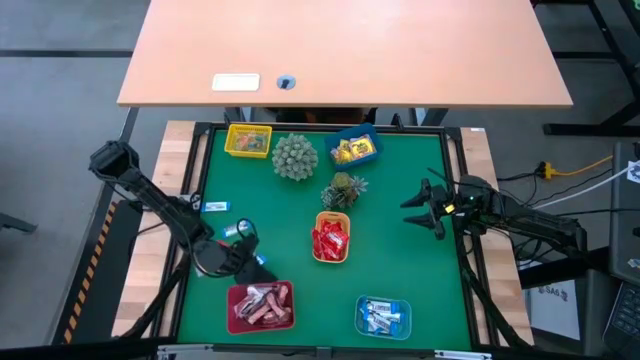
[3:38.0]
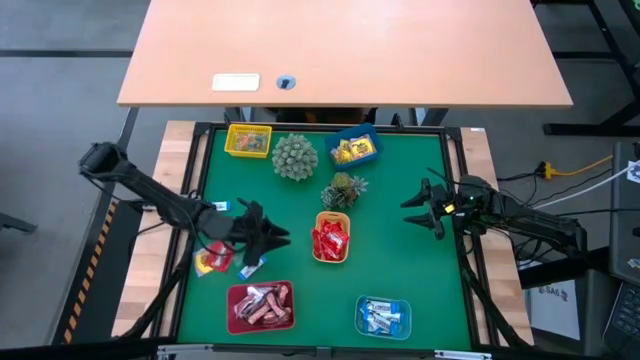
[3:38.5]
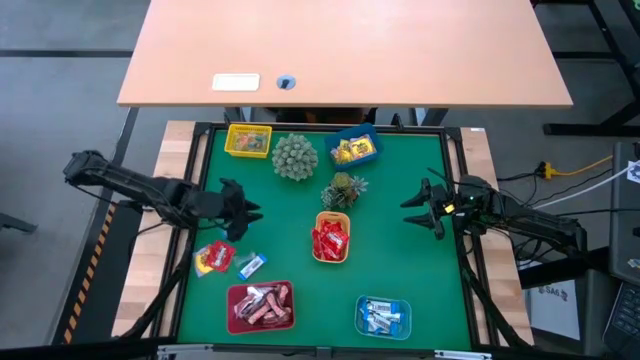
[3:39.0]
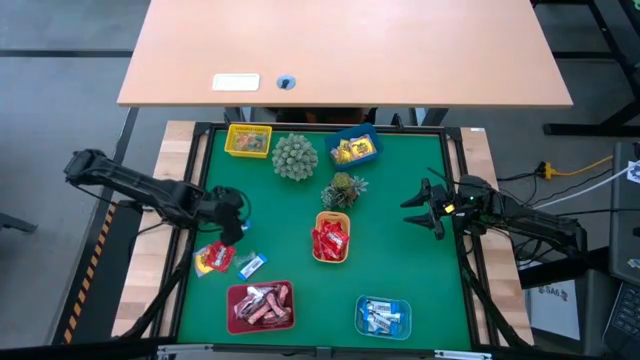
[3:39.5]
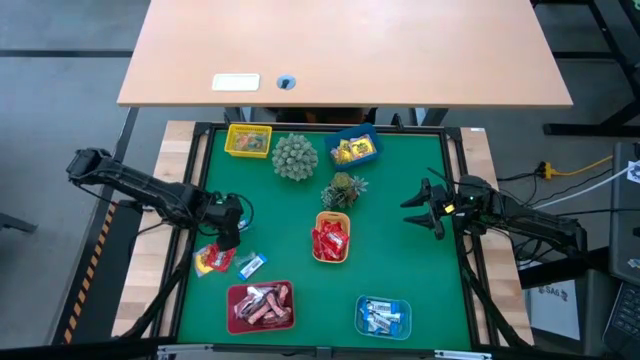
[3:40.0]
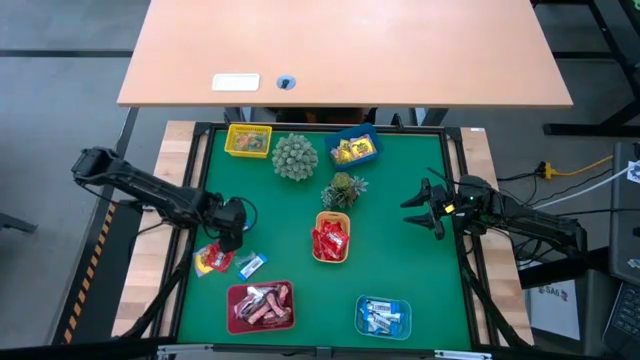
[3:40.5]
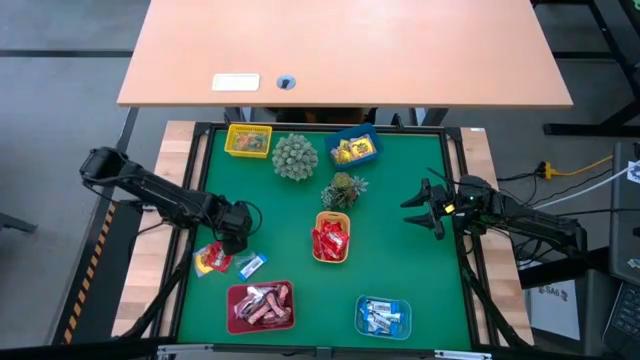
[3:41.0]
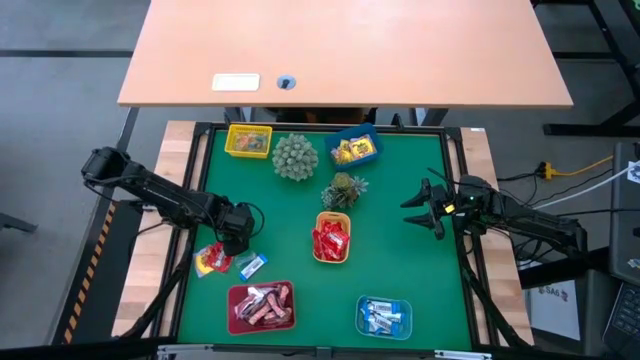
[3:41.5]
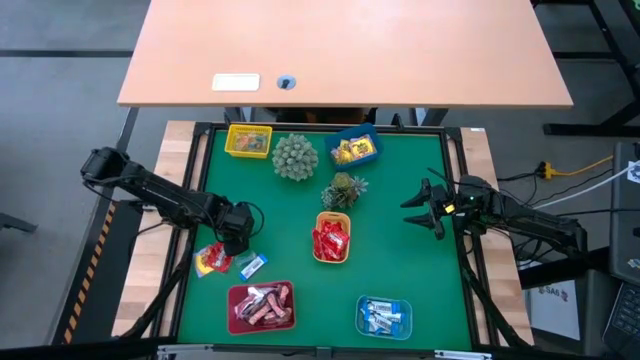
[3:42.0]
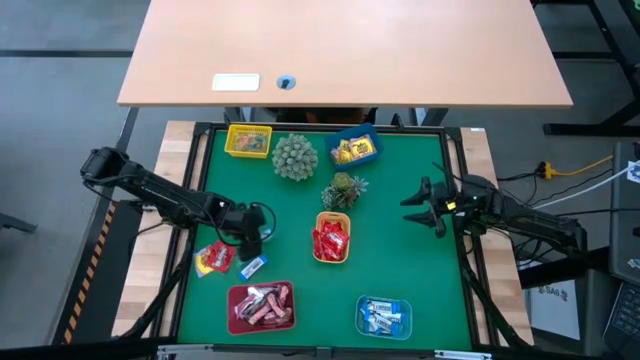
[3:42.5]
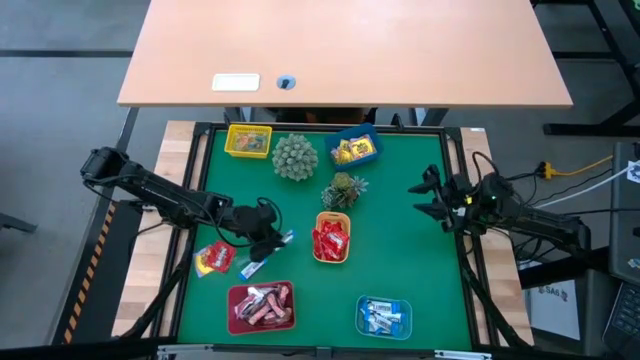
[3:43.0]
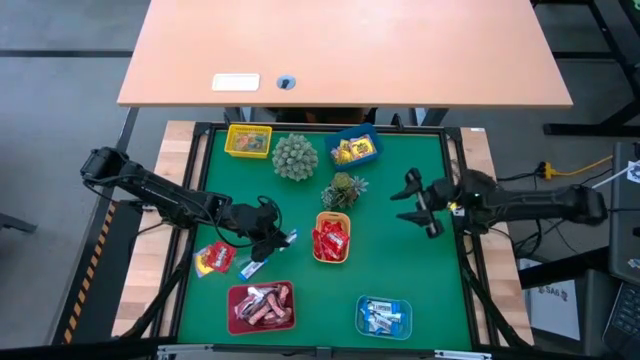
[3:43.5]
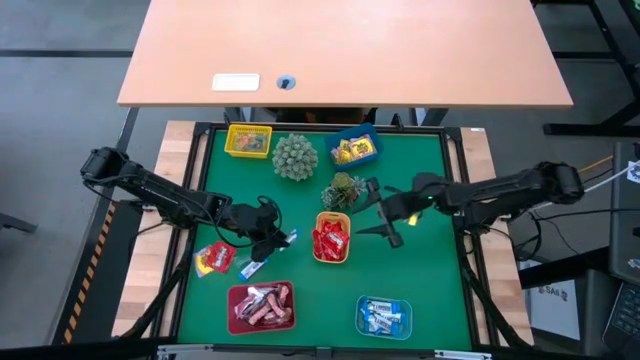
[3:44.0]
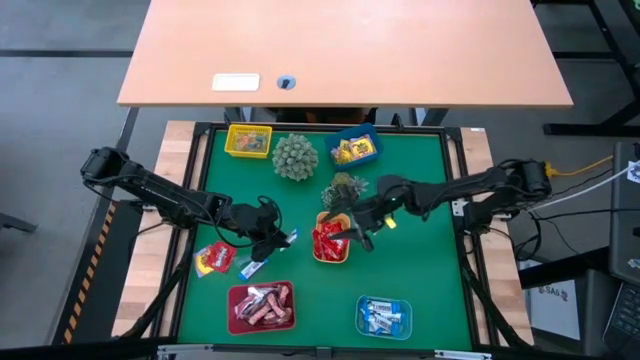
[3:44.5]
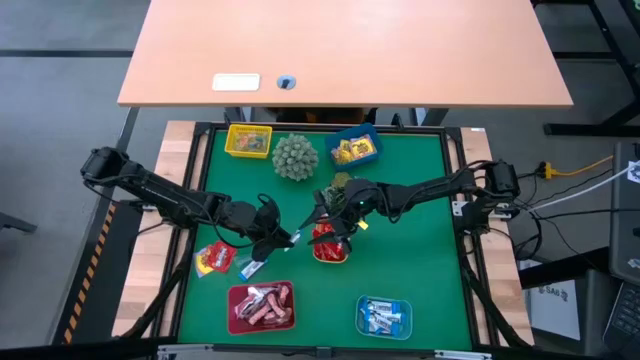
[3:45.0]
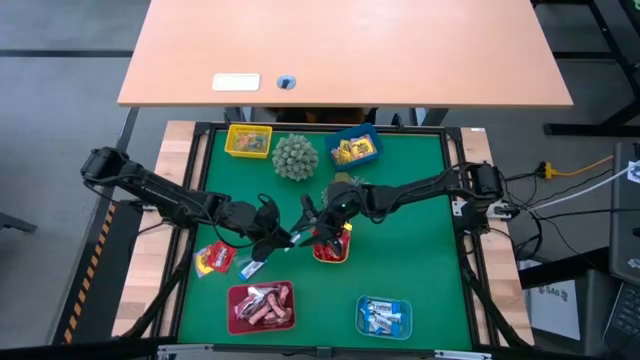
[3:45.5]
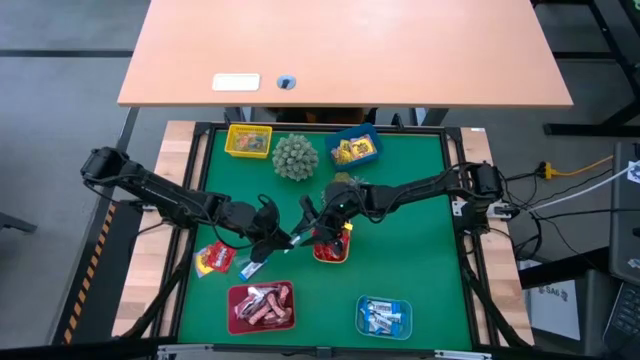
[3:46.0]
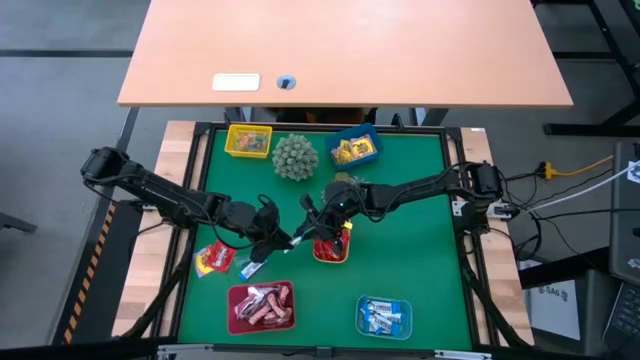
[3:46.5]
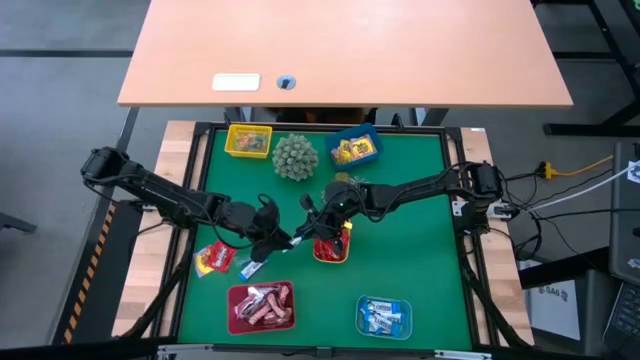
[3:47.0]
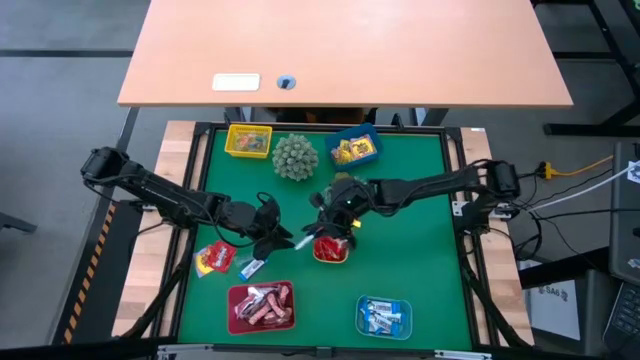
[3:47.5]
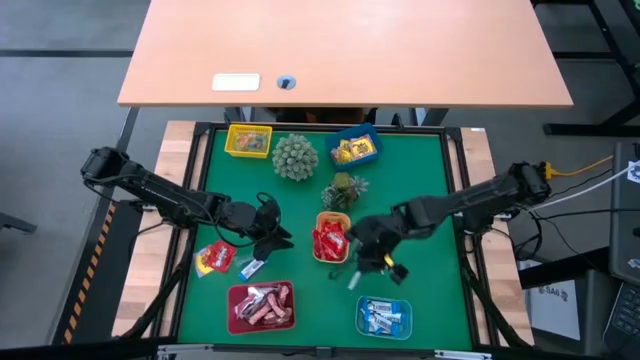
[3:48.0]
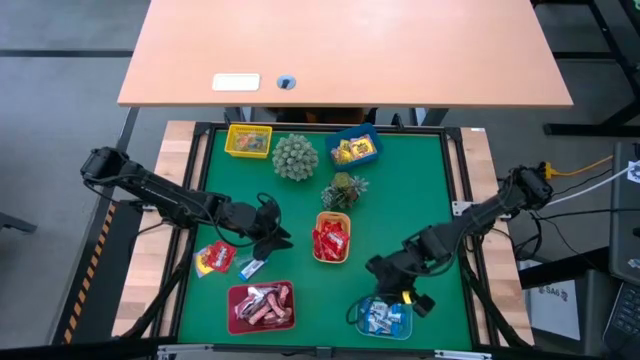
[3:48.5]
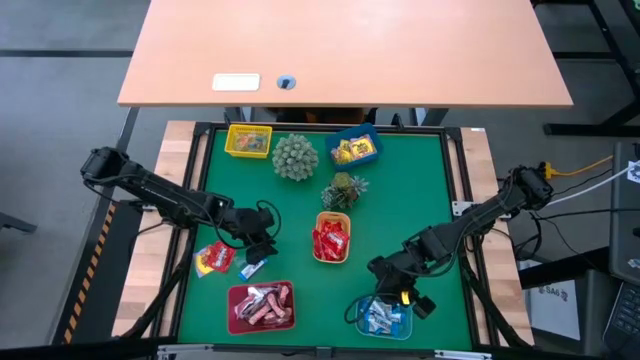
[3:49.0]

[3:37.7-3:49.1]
Task: Sort candy
Put the blue chocolate bar into the light blue bin

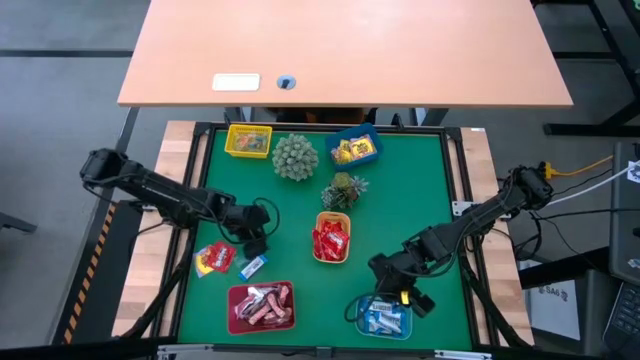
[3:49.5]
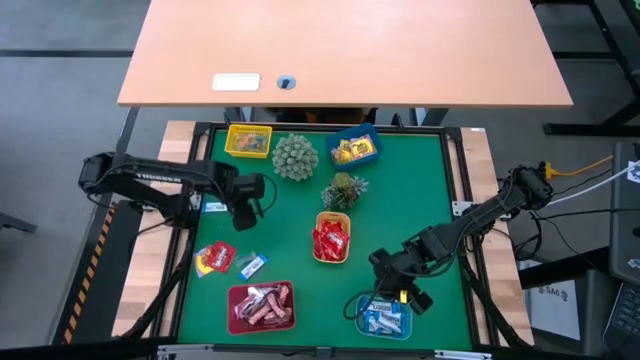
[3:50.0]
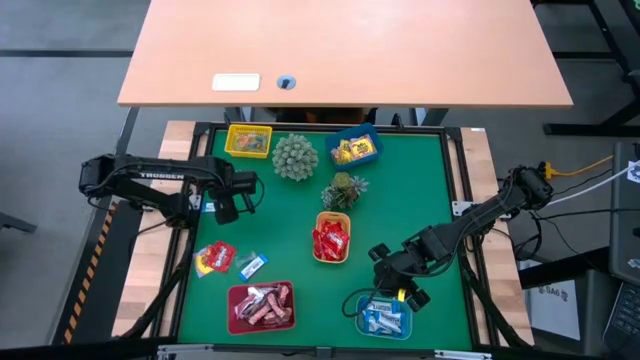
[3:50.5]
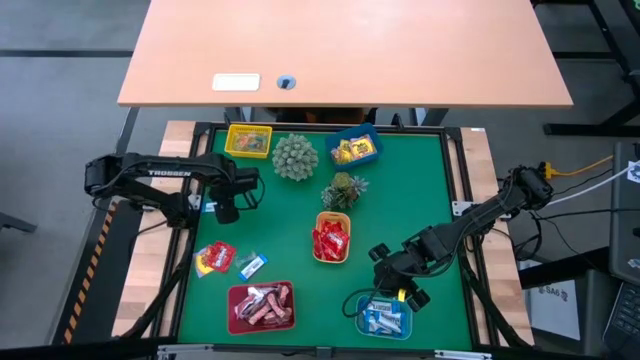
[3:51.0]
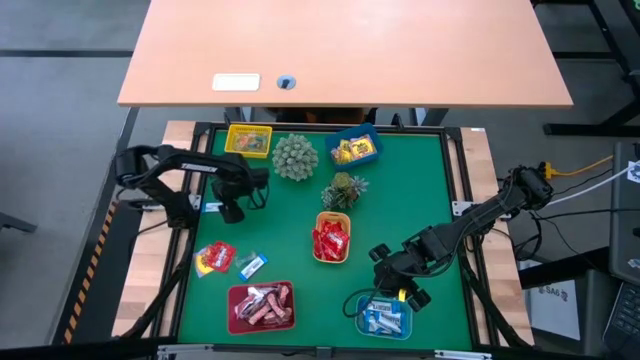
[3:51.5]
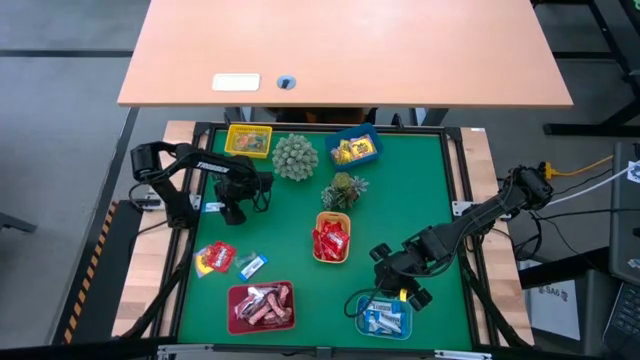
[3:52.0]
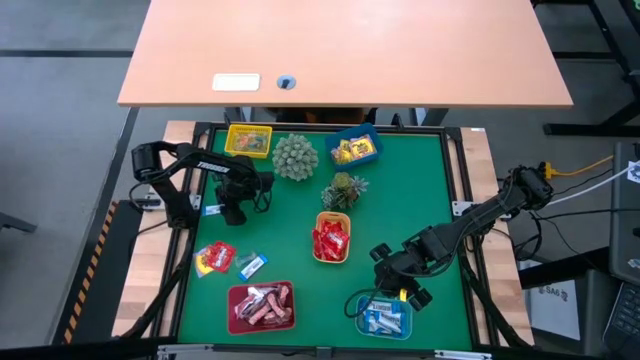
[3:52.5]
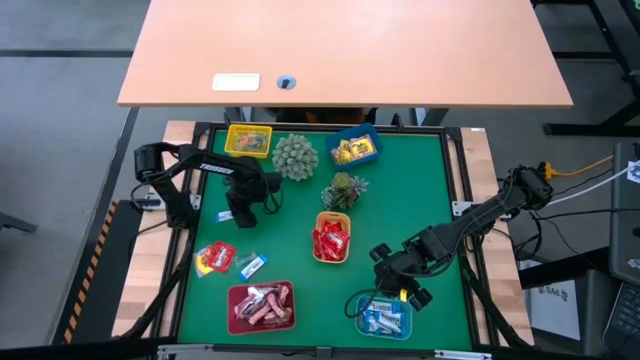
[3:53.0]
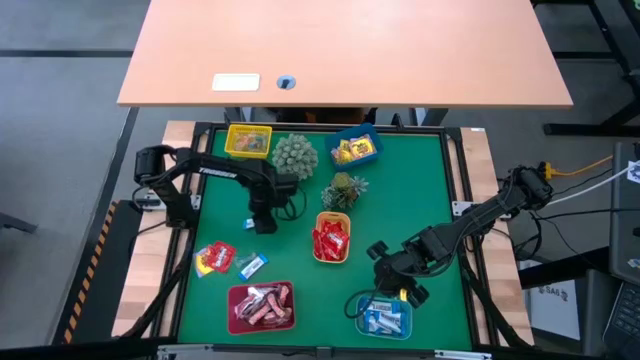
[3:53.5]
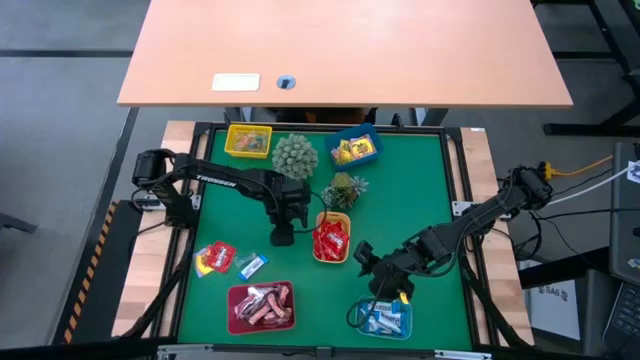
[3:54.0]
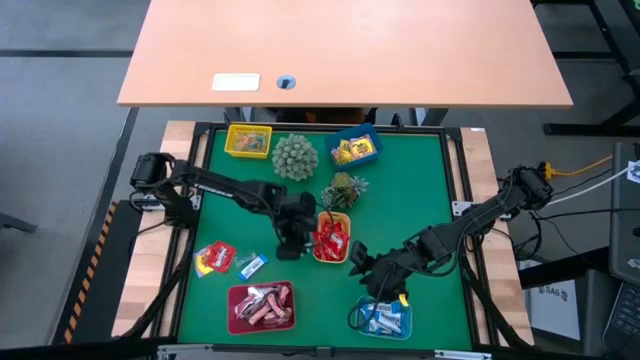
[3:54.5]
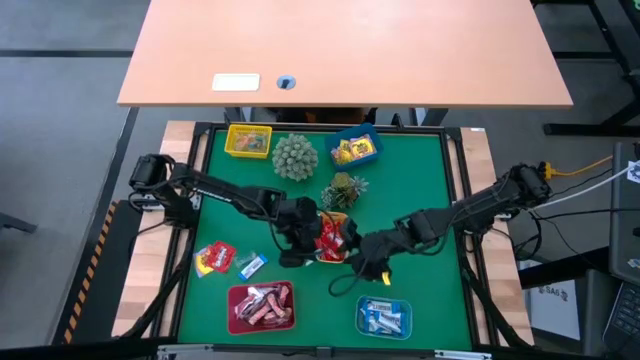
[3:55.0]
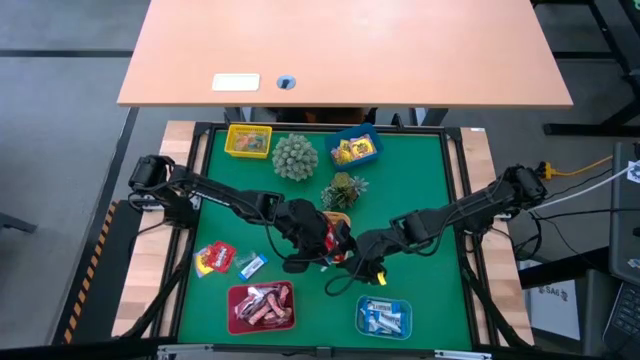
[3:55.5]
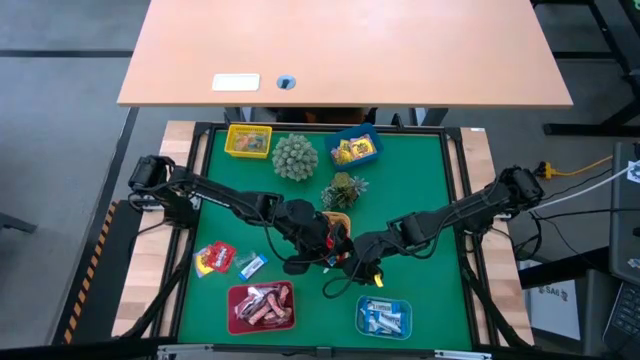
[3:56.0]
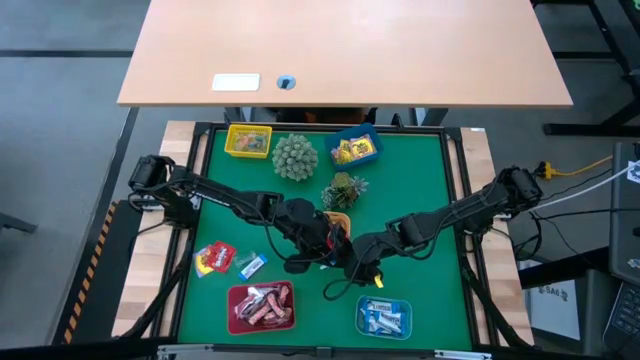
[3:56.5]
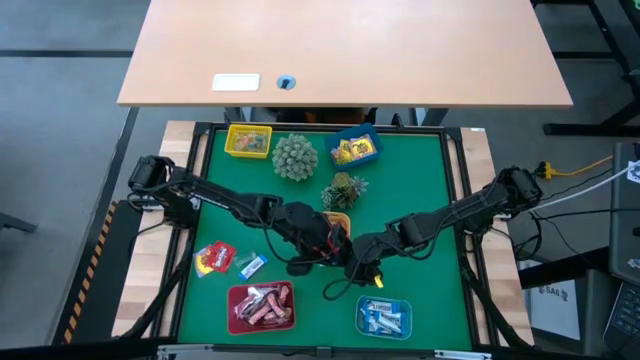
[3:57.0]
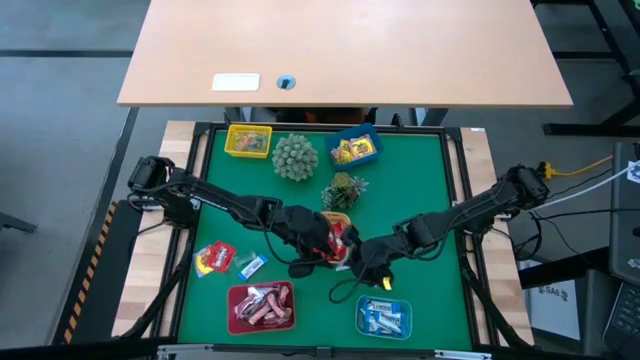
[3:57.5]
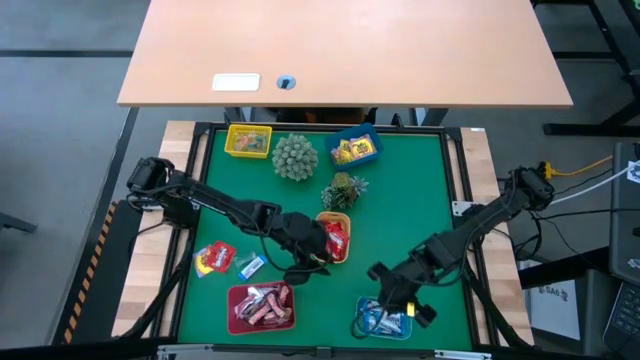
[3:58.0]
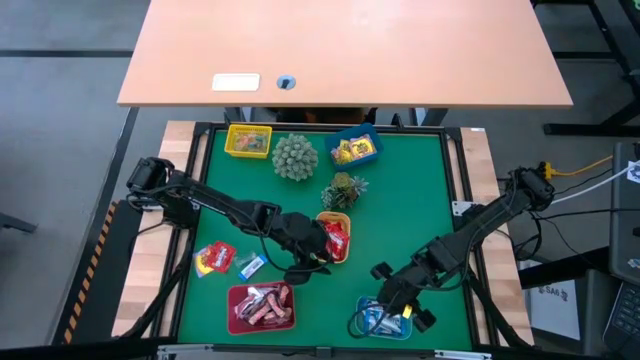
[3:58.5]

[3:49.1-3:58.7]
Put the blue chocolate bar into the light blue bin
